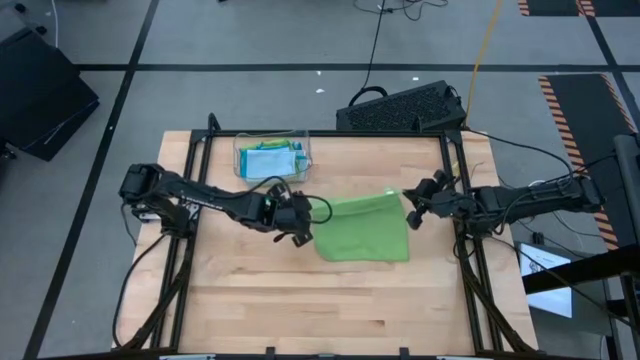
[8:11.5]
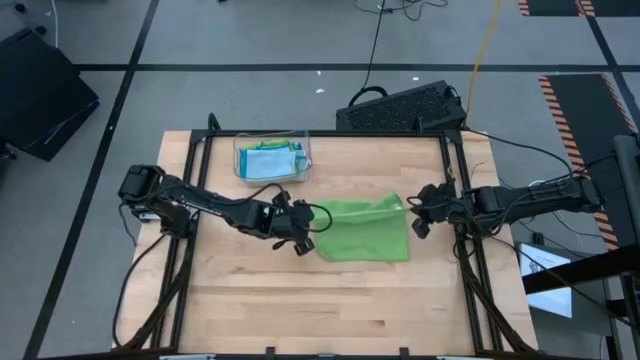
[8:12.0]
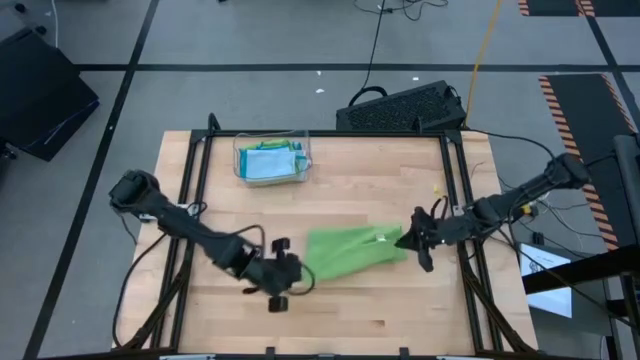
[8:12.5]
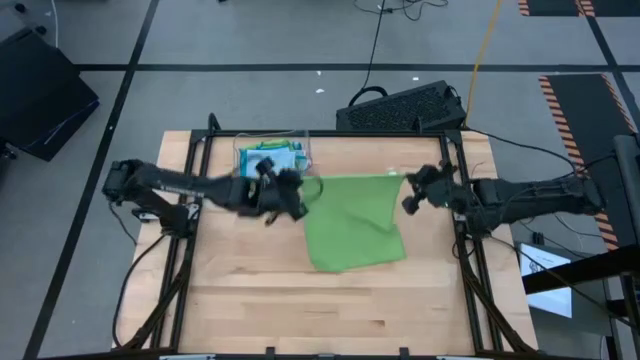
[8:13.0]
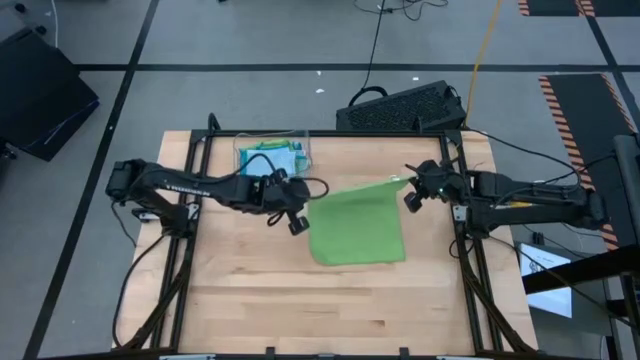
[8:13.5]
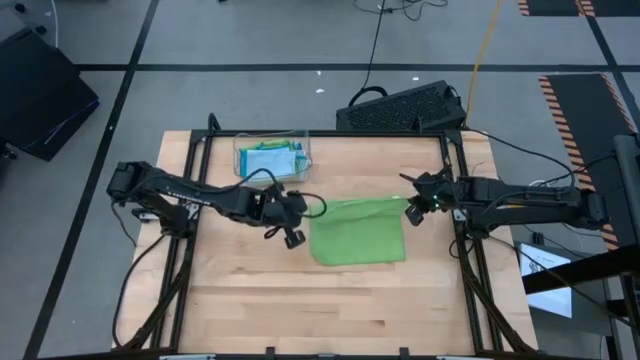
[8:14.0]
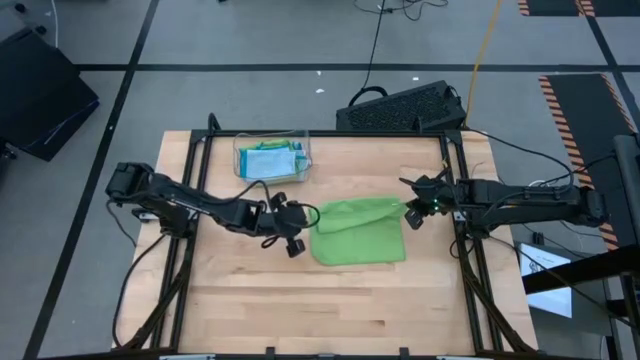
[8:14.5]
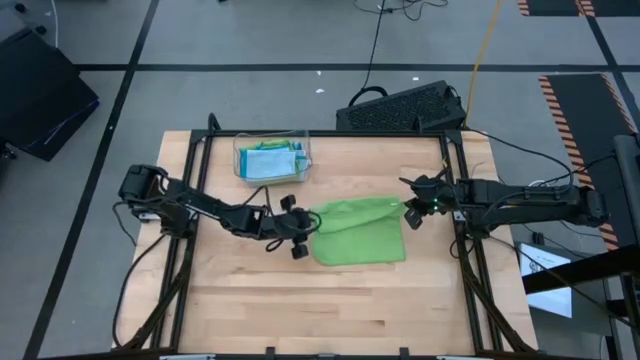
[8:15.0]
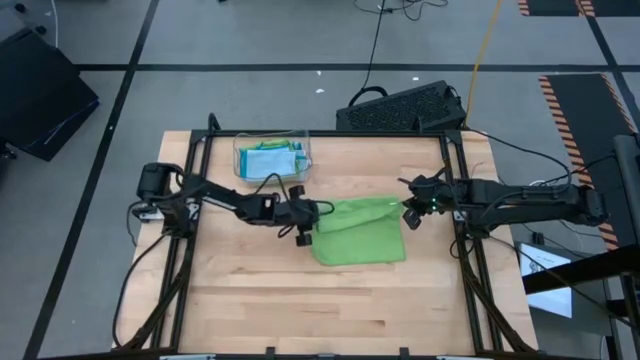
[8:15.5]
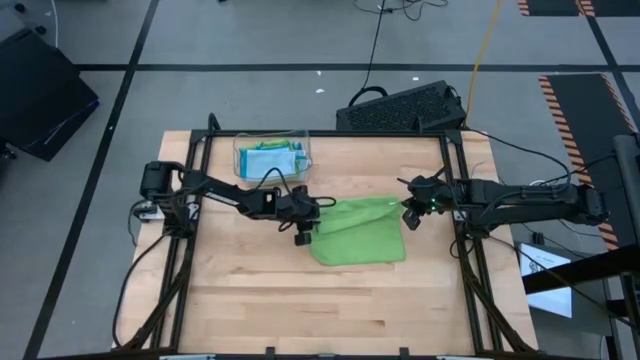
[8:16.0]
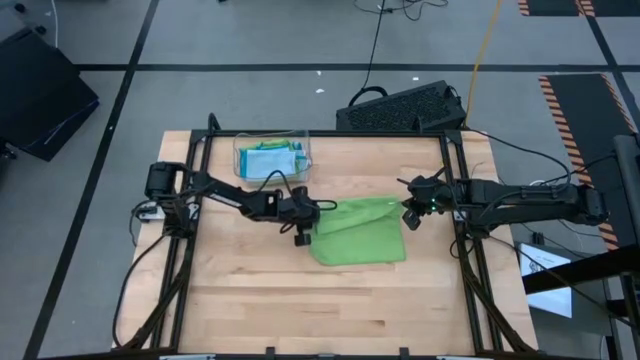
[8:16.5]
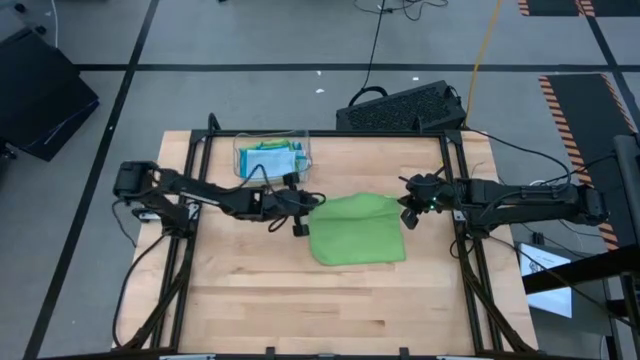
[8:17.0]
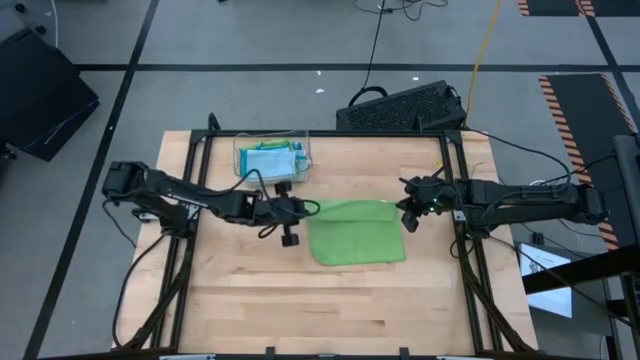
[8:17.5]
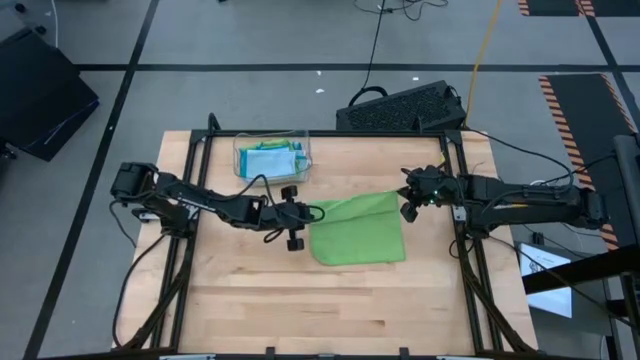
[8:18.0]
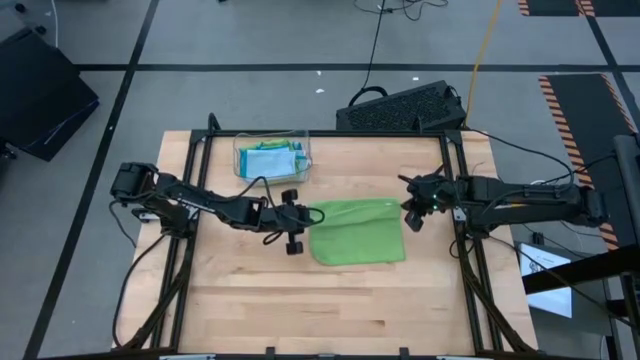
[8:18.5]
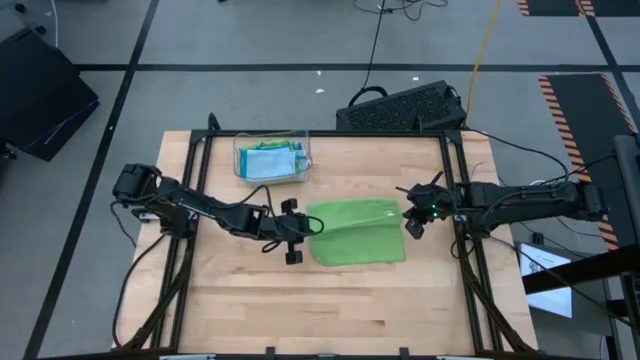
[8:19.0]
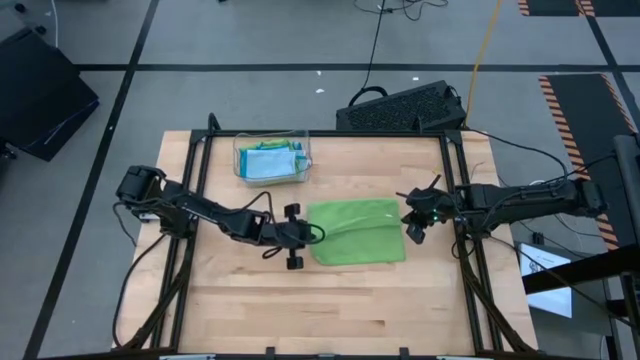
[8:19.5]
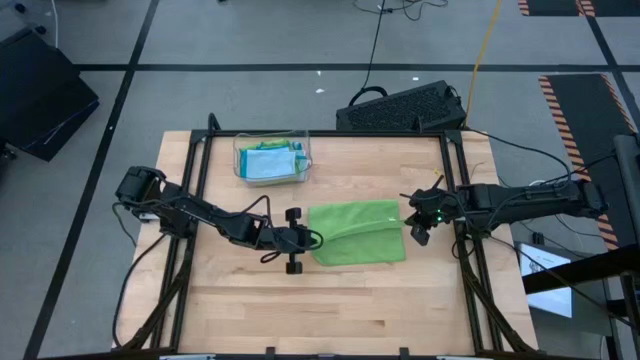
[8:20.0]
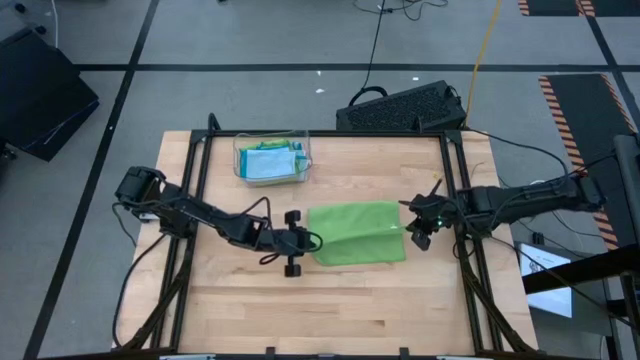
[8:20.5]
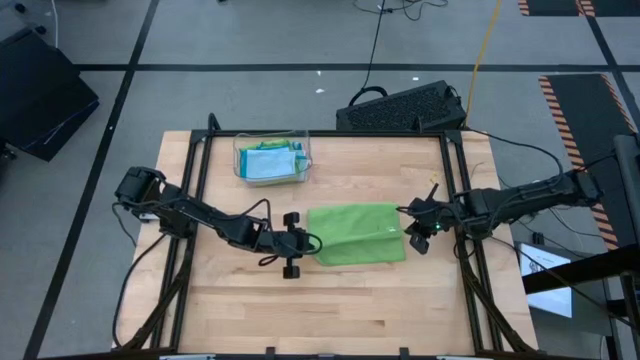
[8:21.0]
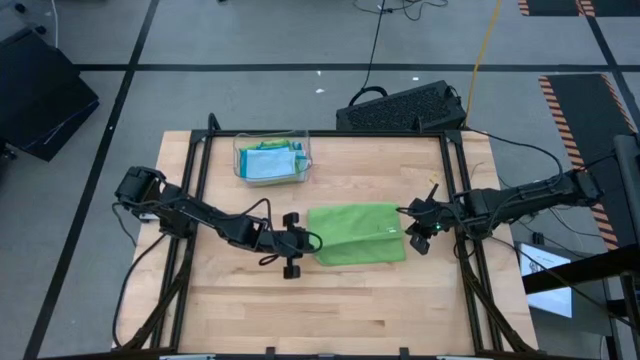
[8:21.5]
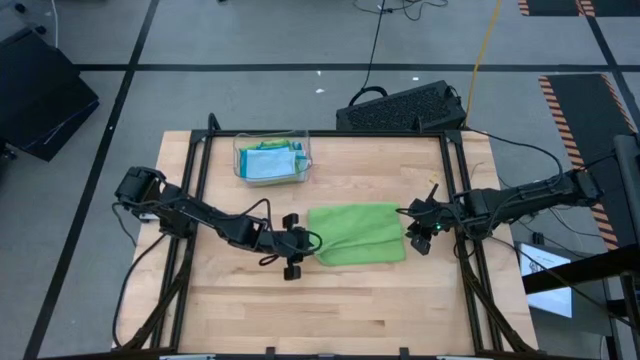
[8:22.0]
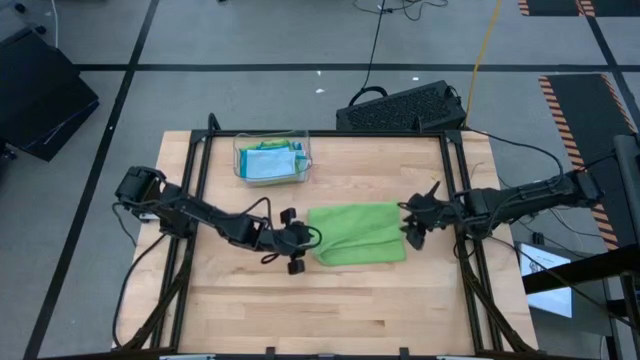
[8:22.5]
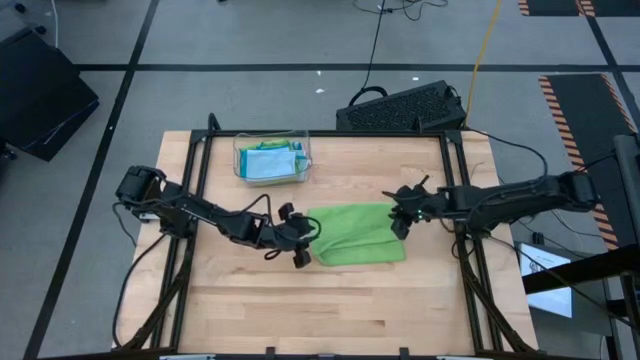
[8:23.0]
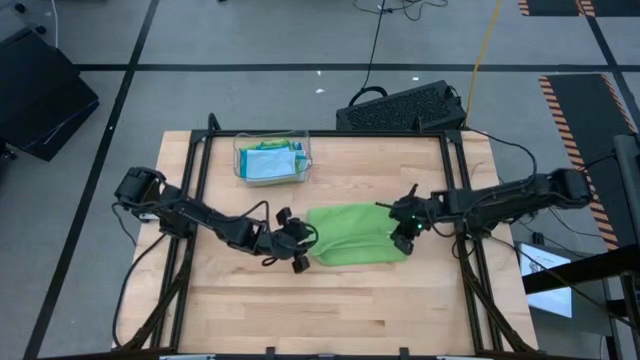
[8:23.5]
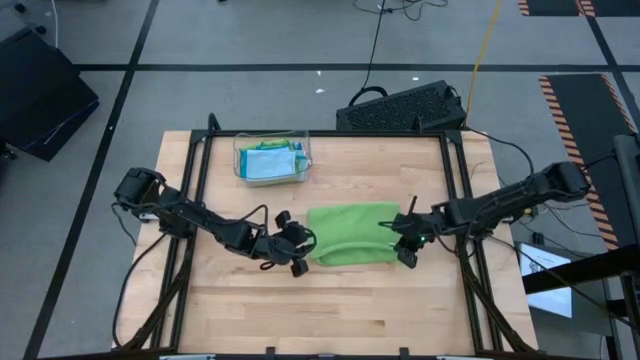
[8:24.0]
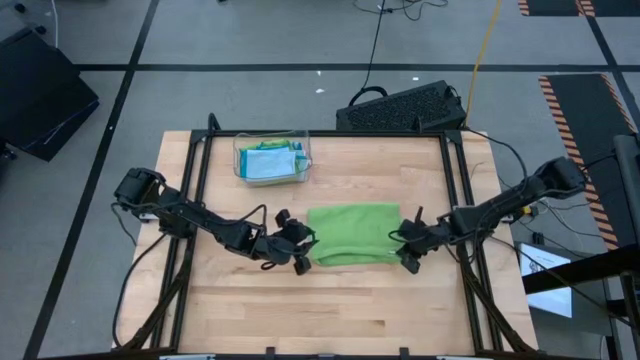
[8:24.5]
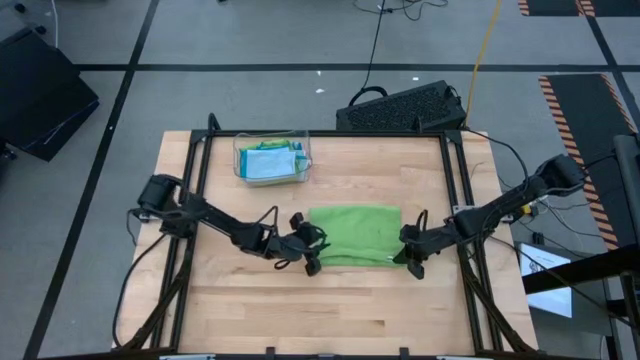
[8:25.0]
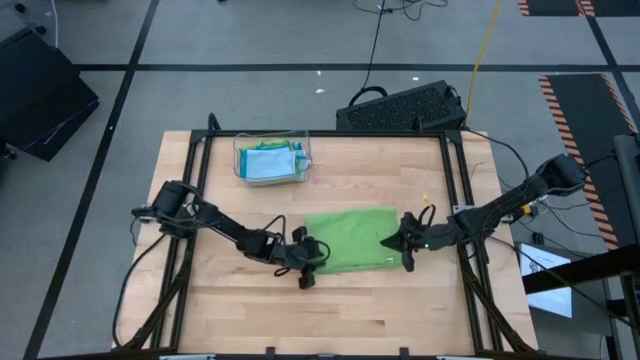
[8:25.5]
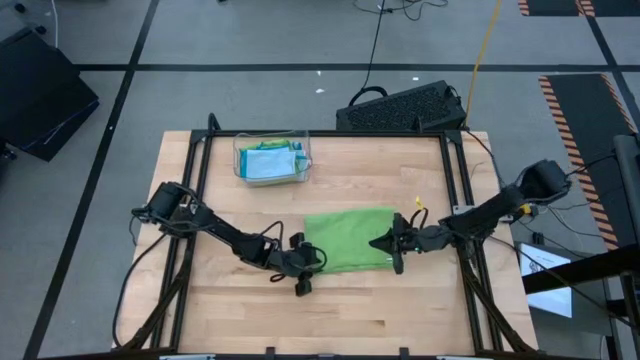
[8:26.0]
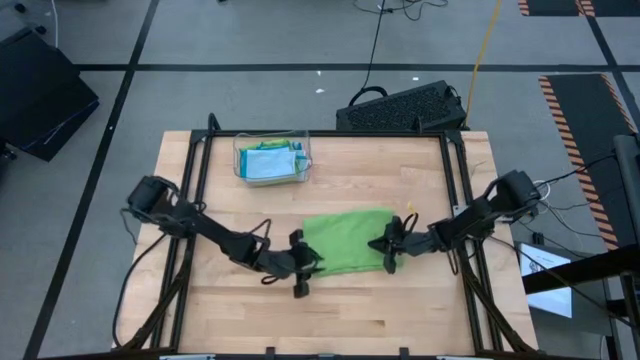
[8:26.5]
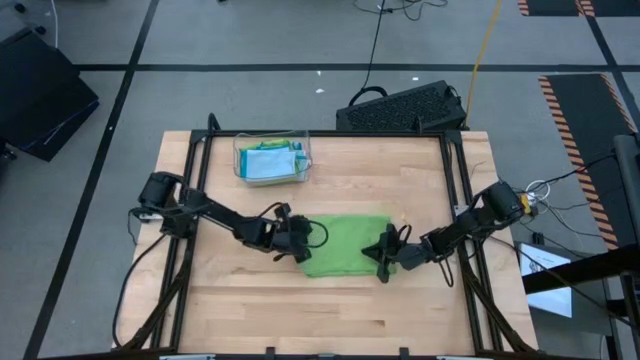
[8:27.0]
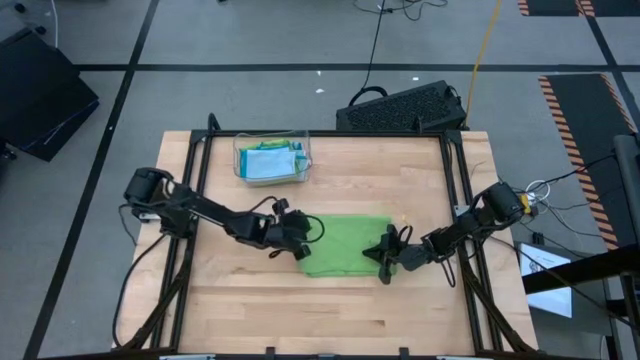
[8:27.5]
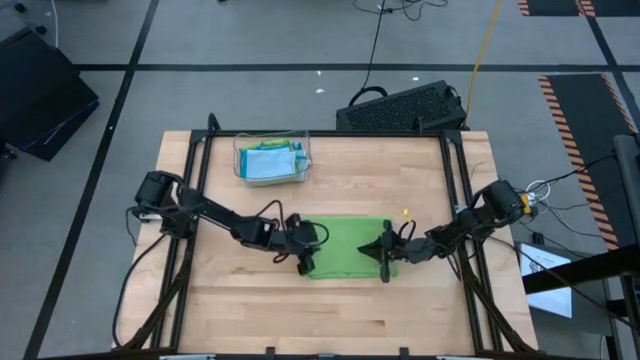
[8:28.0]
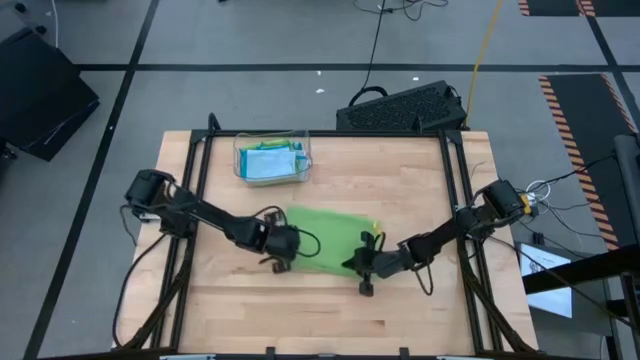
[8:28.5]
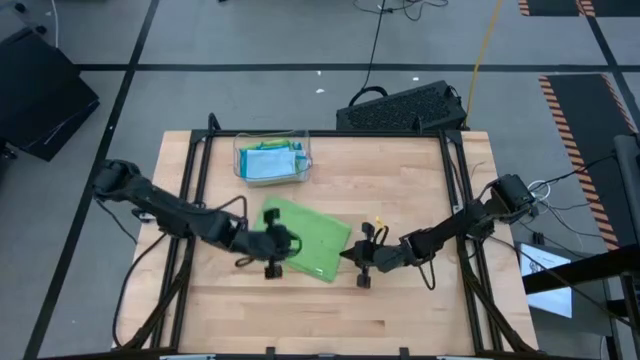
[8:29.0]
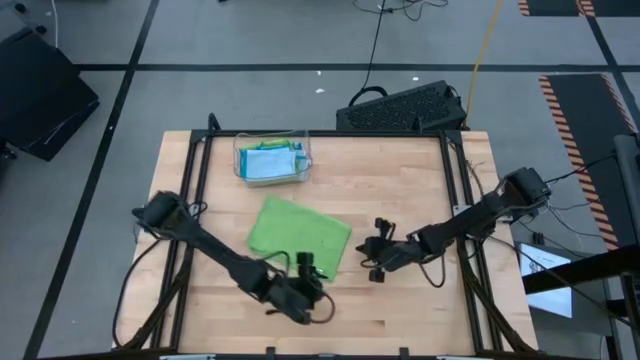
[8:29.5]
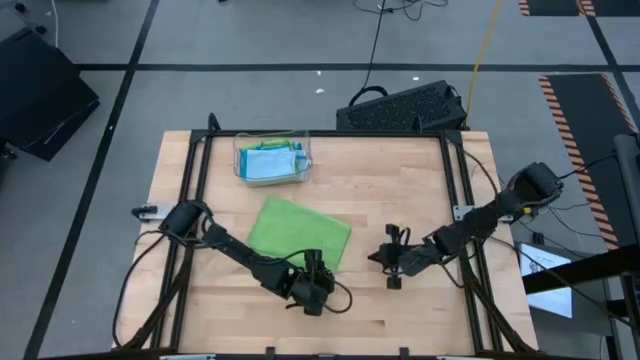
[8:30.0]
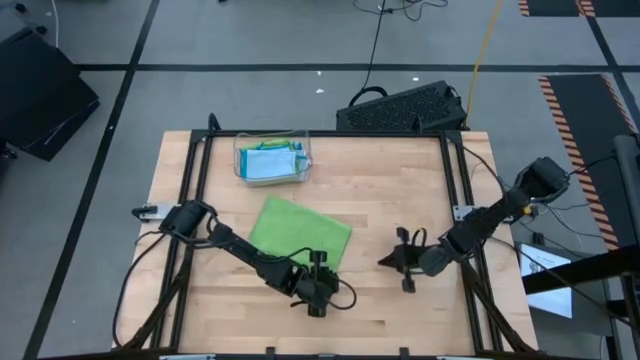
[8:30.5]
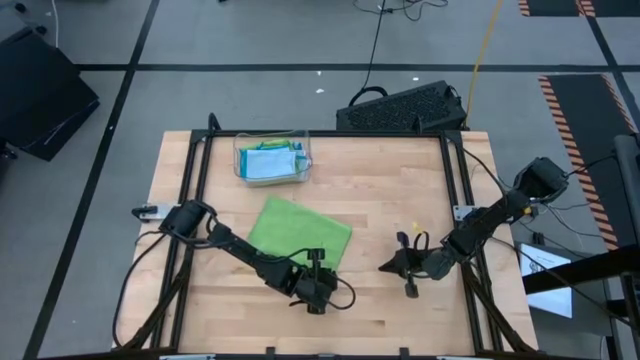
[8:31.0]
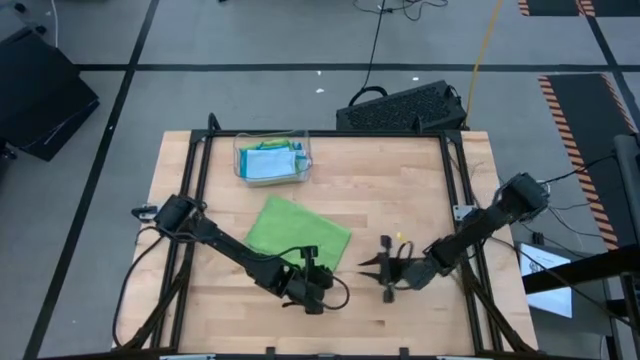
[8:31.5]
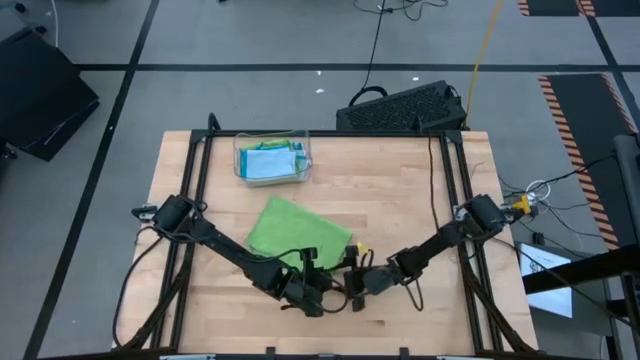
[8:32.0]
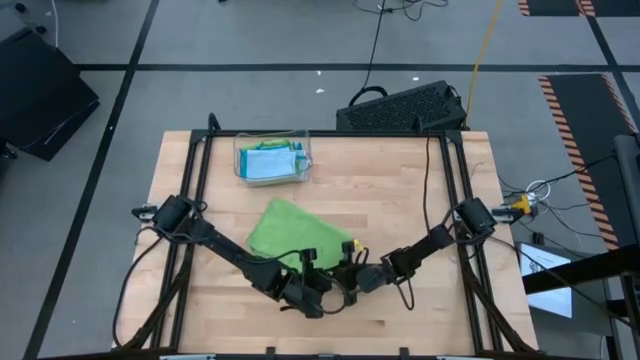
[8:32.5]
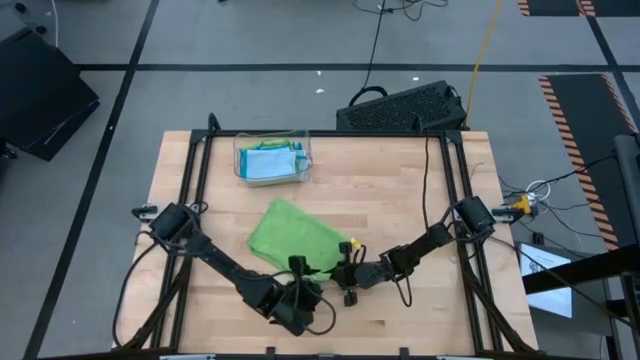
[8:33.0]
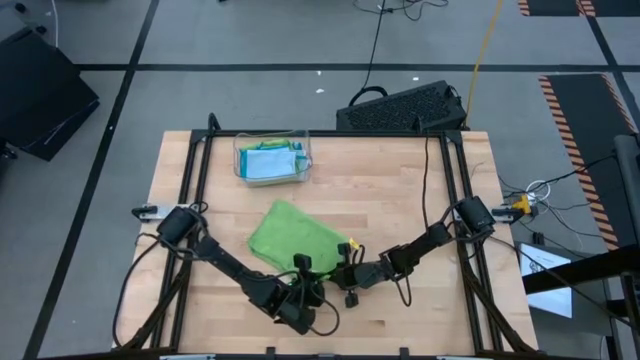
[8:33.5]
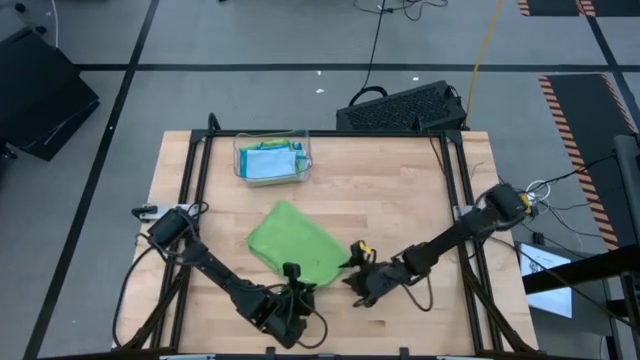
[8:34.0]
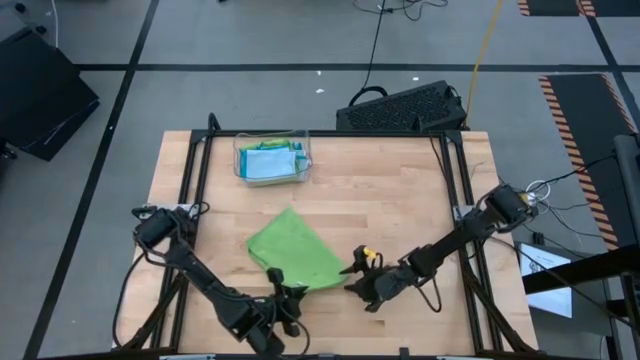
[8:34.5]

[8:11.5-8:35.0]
Task: Fold microfiber towels
Fold the green microfiber cloth
